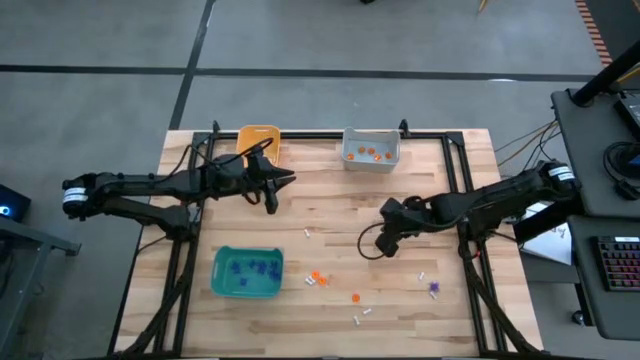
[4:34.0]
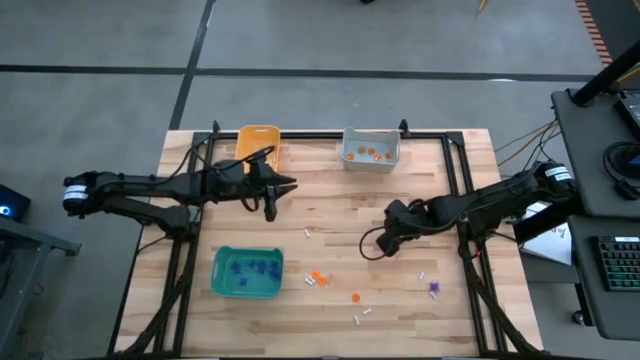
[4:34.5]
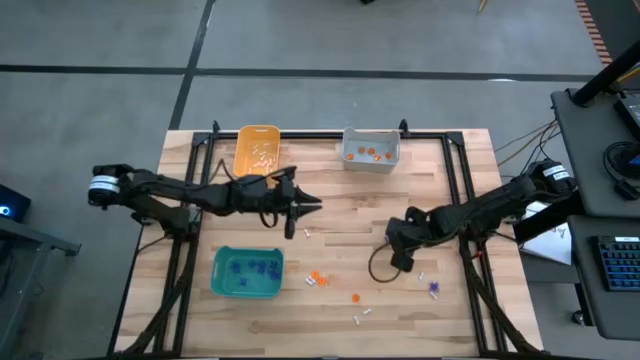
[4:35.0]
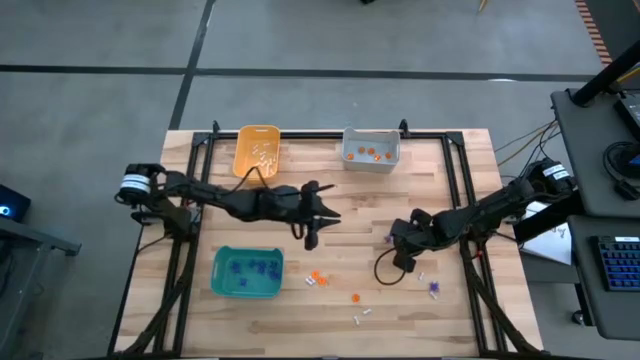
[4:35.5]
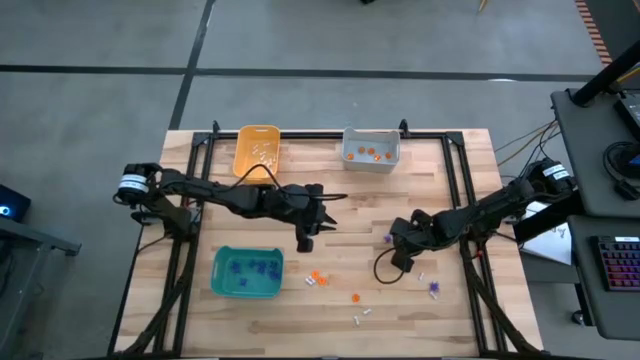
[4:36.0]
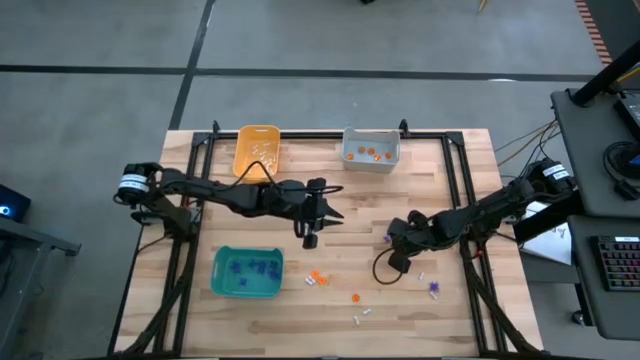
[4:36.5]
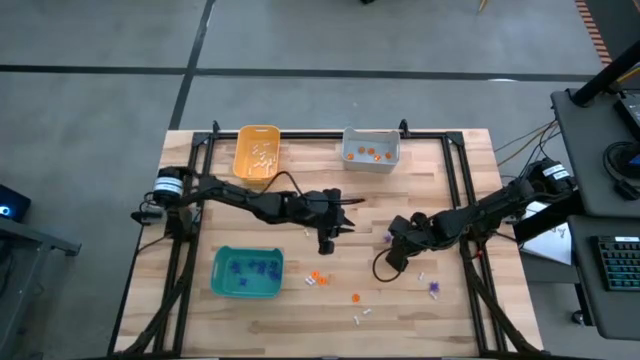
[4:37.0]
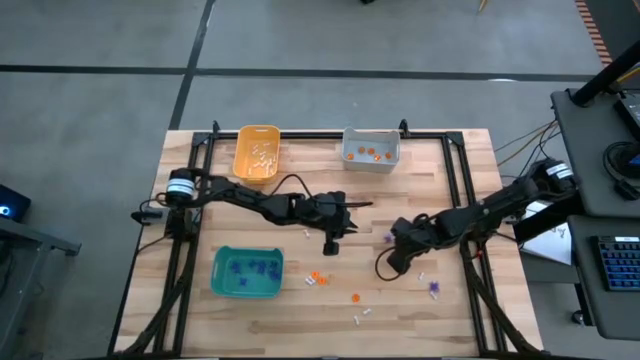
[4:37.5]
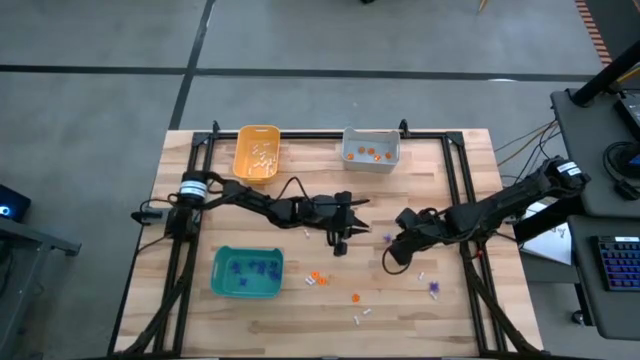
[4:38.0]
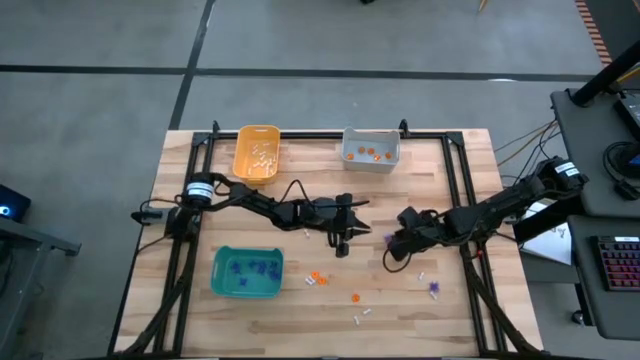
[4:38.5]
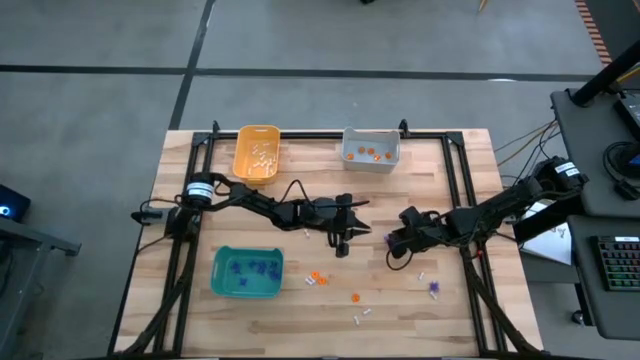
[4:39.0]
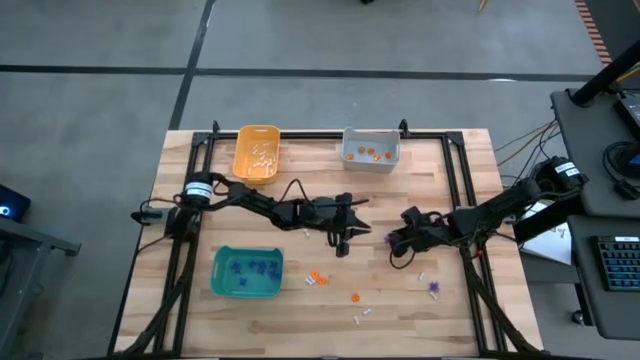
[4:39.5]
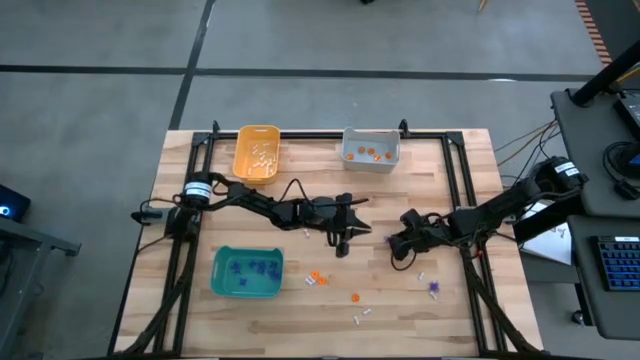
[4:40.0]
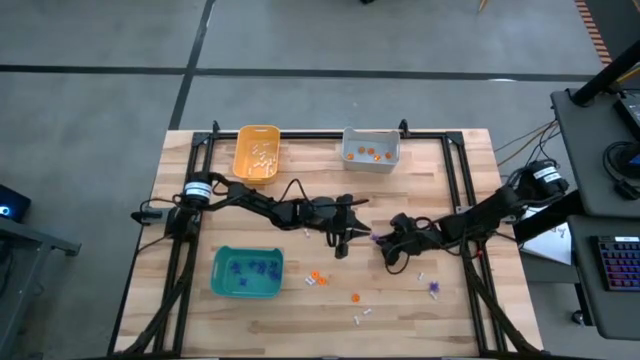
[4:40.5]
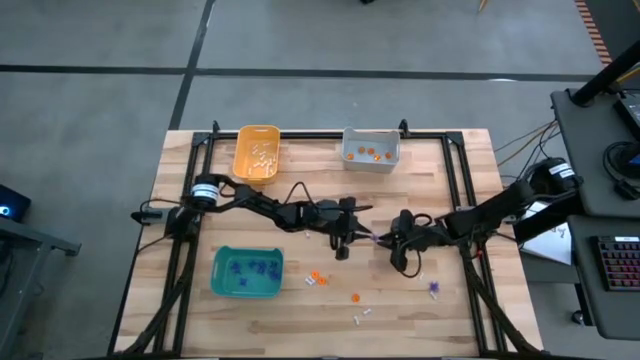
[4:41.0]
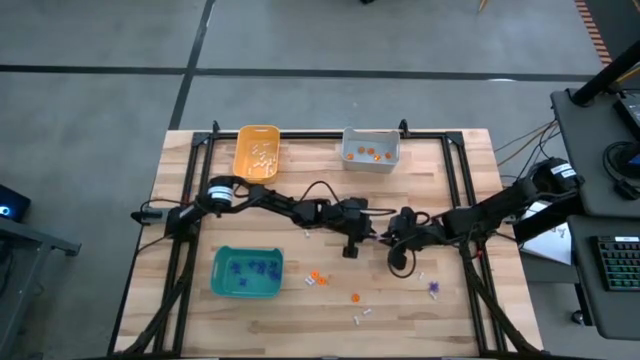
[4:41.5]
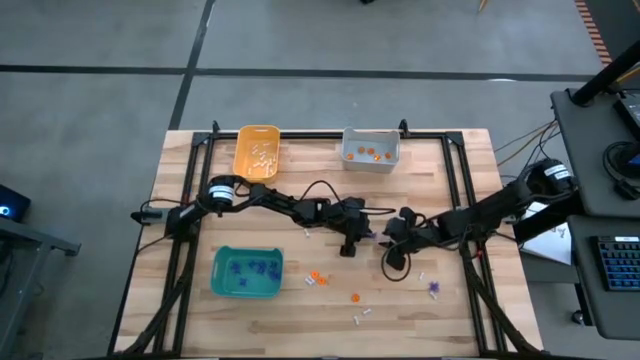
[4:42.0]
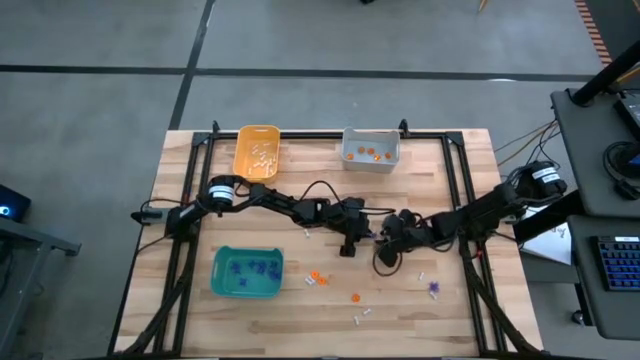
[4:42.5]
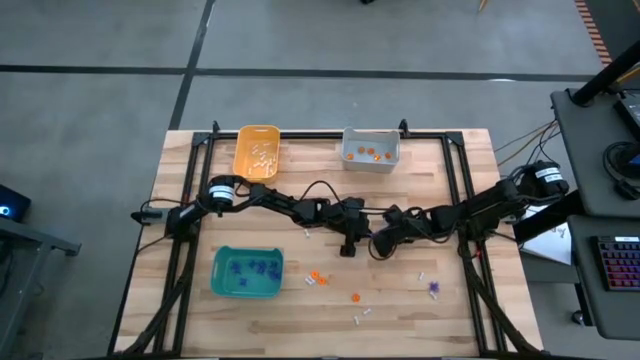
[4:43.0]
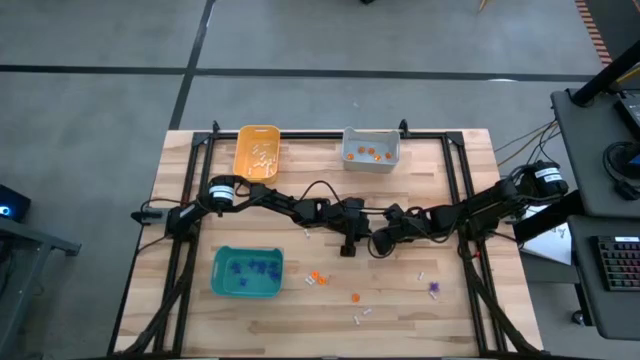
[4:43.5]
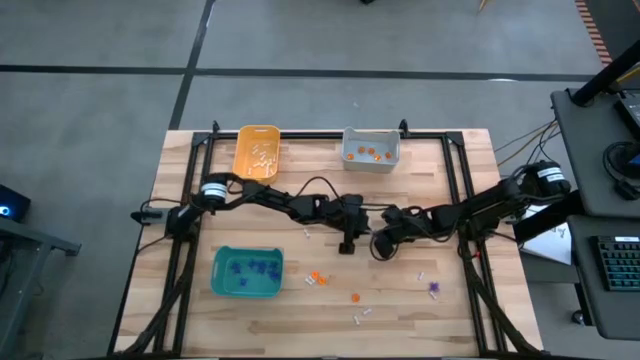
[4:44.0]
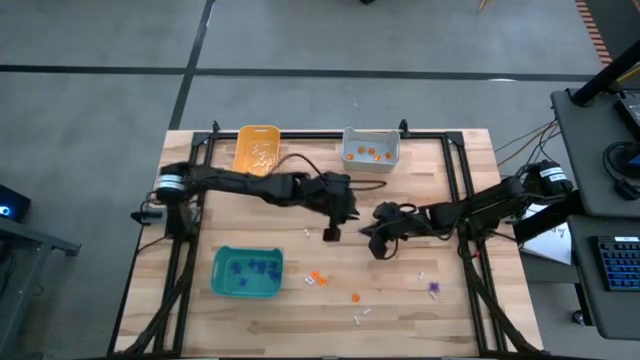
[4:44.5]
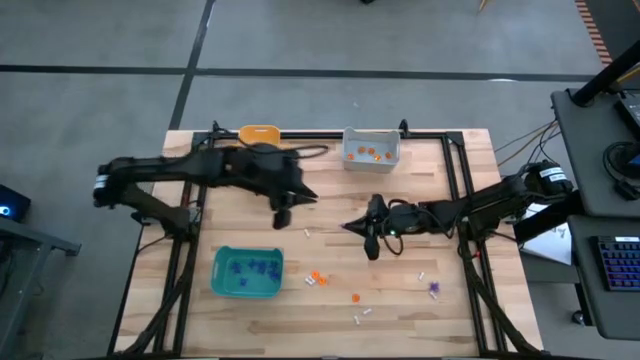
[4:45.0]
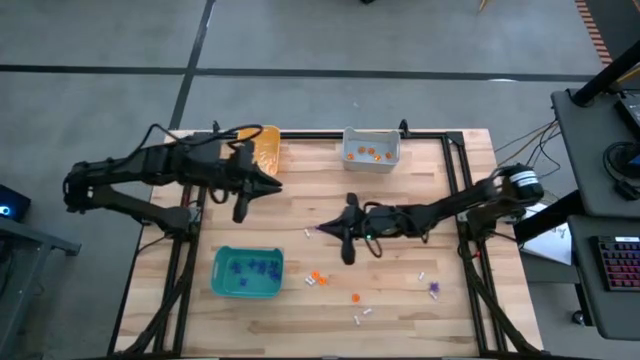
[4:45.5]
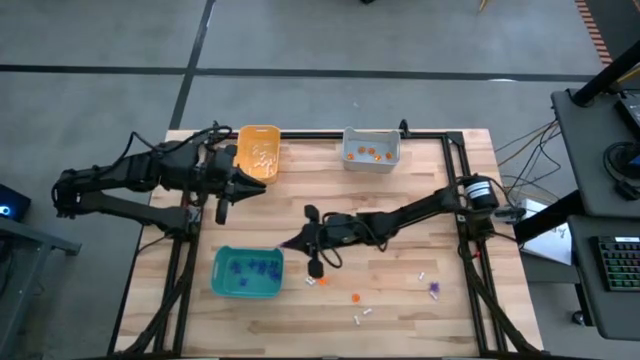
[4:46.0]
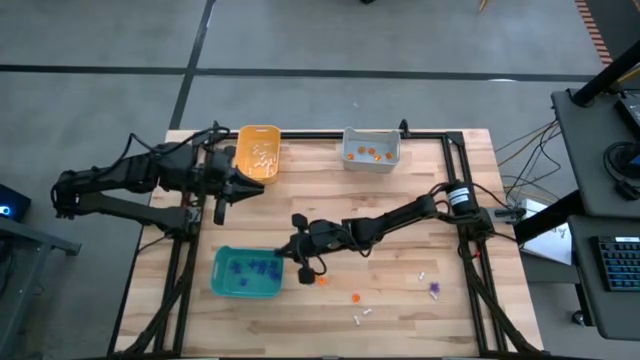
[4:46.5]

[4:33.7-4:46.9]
Task: Sort Halloween decoration
Put the blue spider toy into the green bin

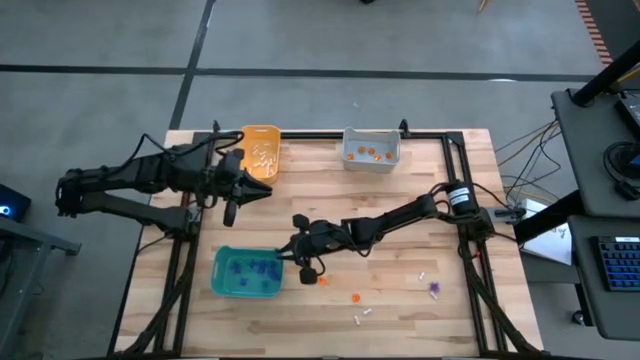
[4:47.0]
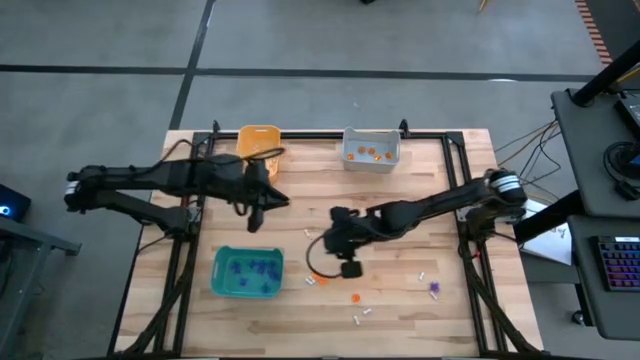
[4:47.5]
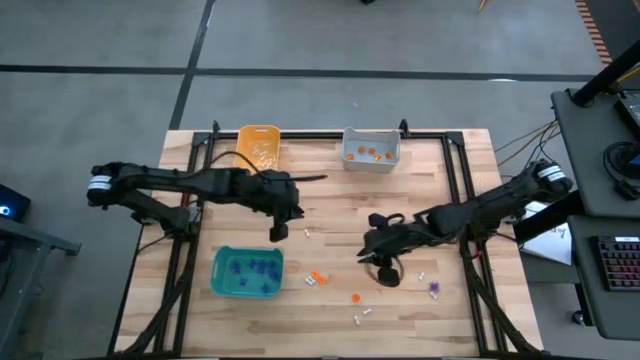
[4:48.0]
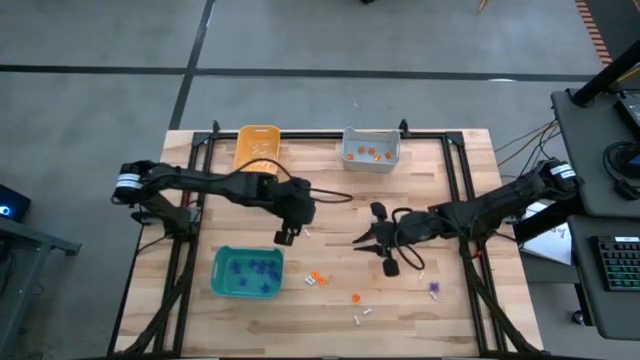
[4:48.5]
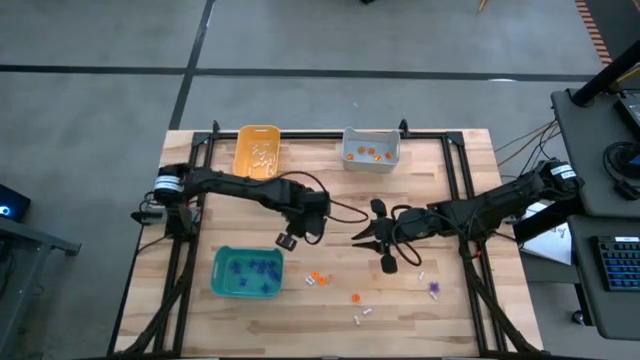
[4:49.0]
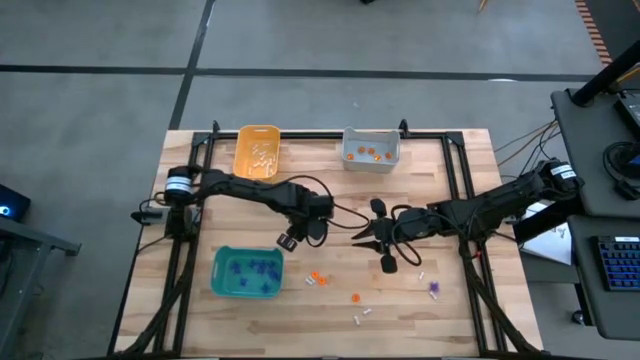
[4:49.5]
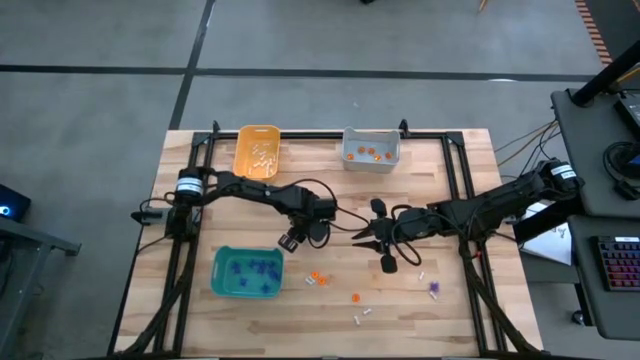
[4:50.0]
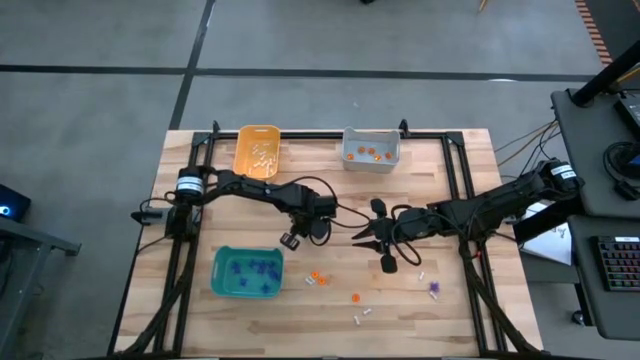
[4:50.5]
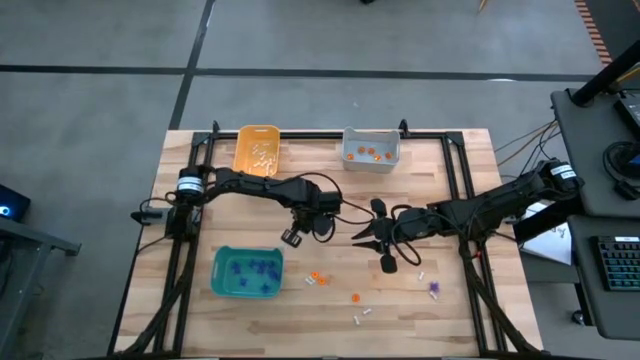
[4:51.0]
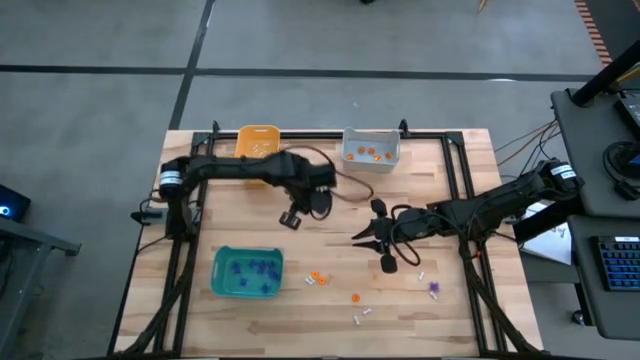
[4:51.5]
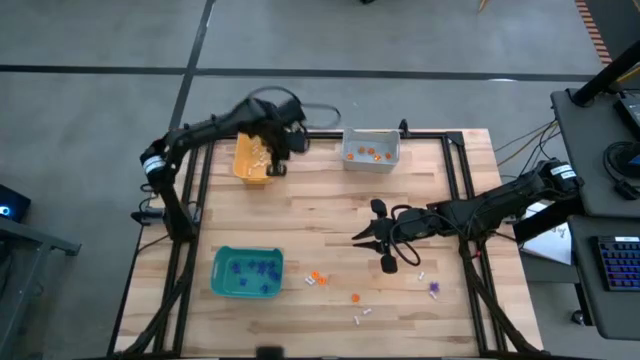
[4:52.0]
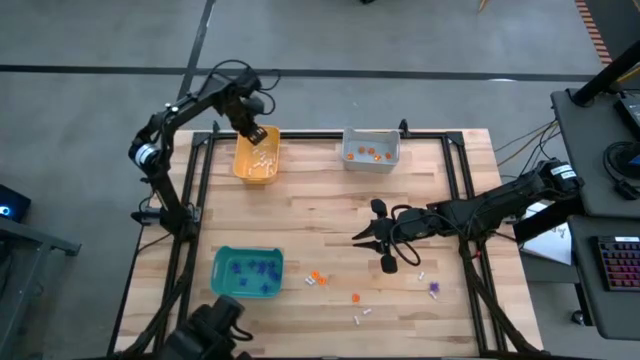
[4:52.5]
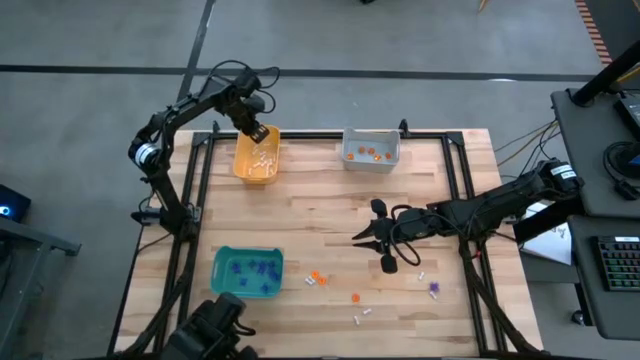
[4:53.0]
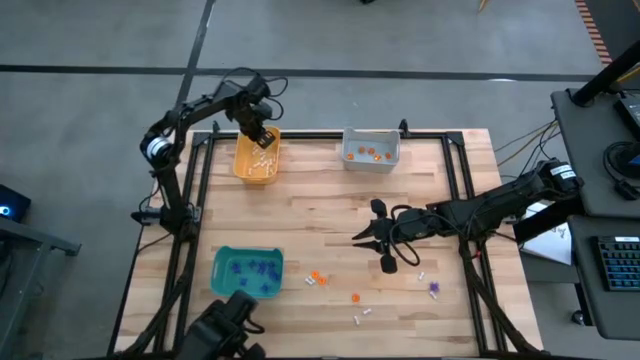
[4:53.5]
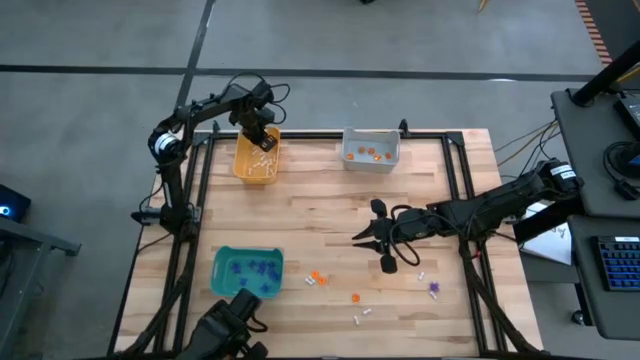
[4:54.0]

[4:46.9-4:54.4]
Put the white bone toy into the orange bin
